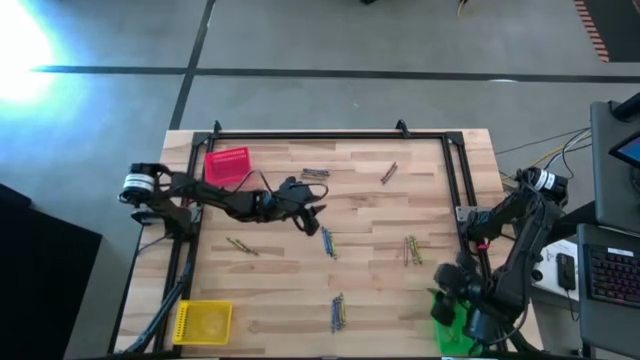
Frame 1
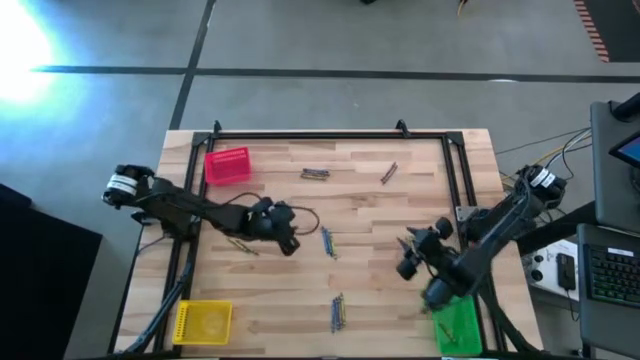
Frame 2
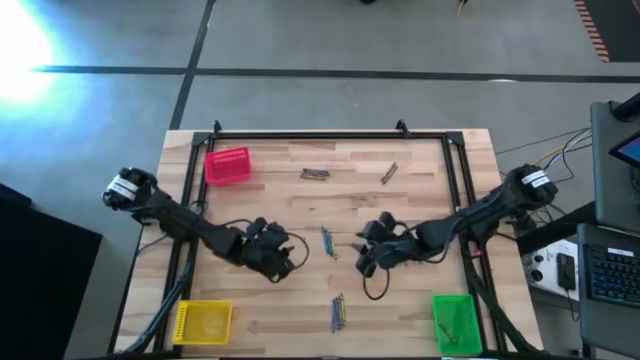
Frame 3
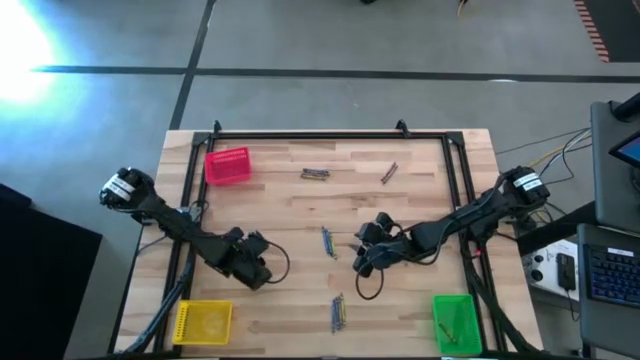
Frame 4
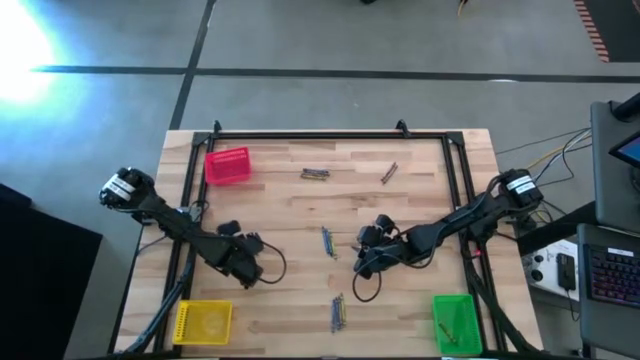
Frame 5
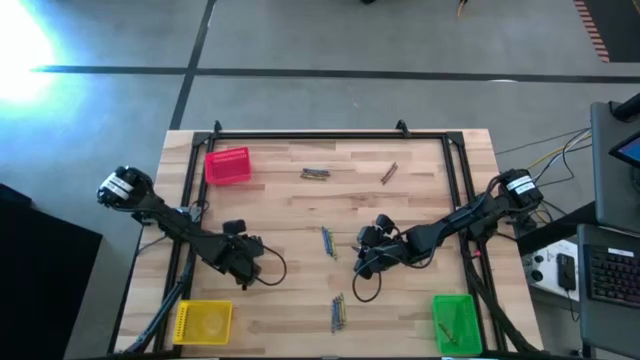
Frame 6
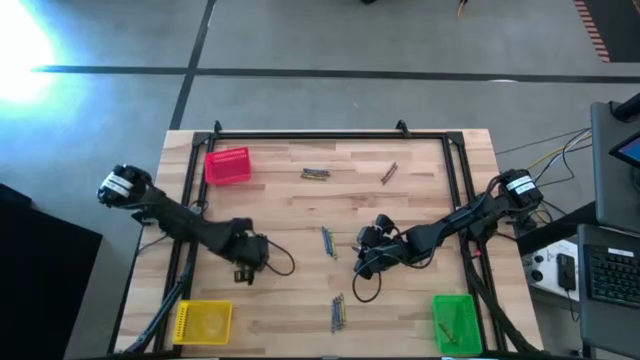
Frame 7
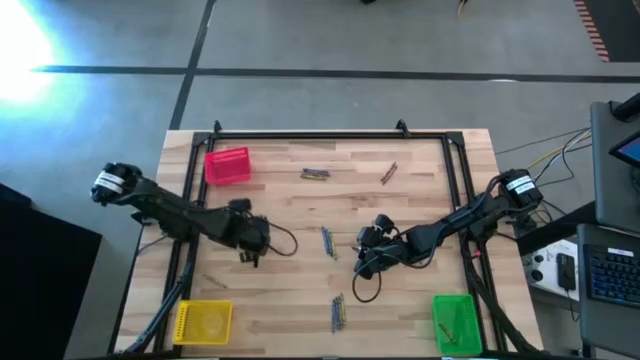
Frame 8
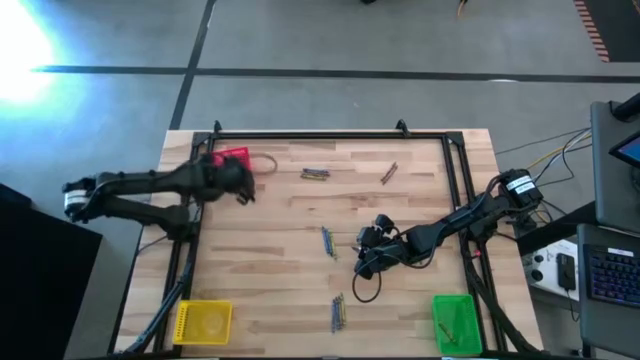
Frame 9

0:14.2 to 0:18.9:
Task: Sort crayons
Put the brown crayon into the red bin

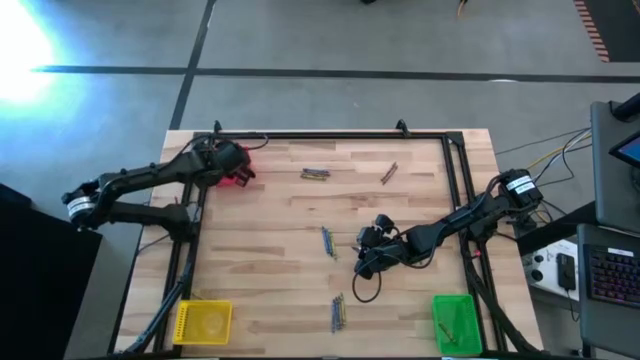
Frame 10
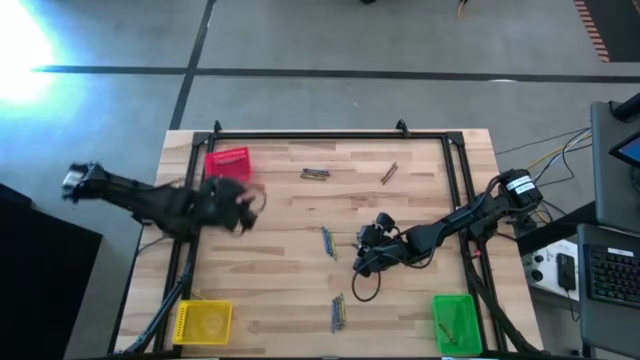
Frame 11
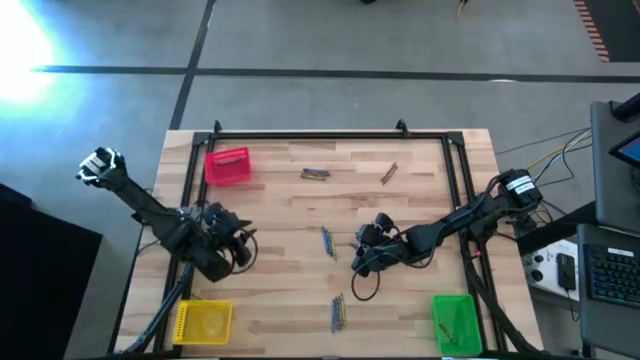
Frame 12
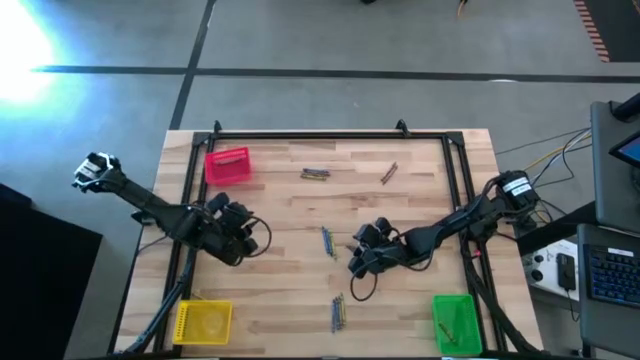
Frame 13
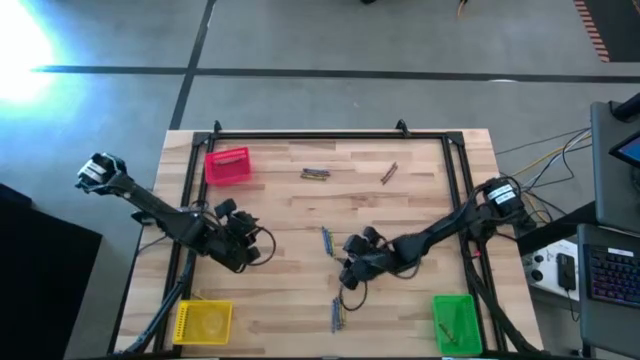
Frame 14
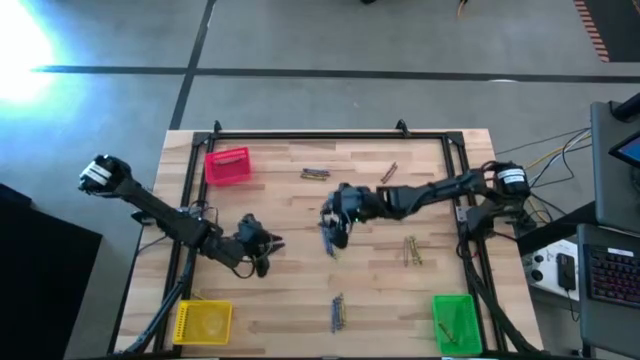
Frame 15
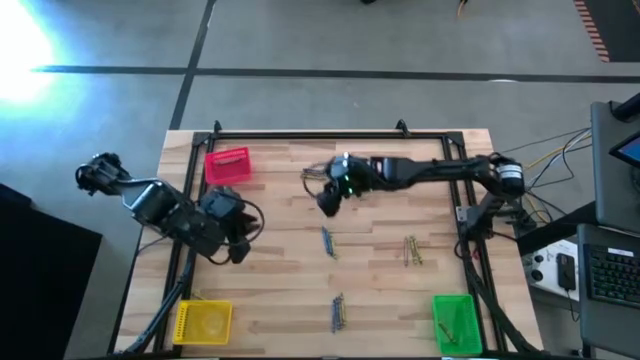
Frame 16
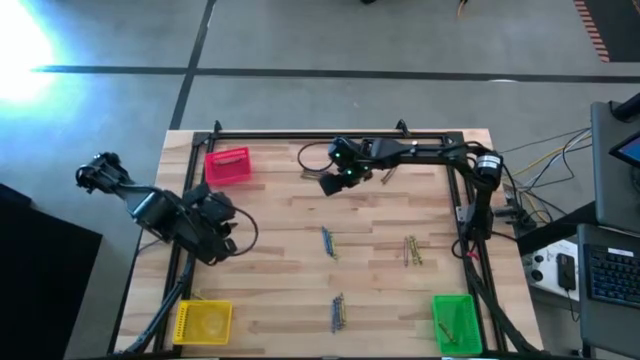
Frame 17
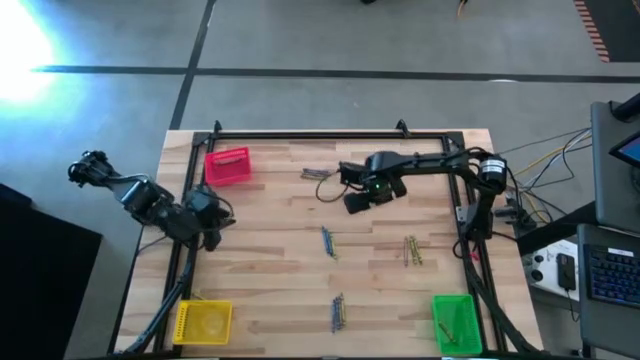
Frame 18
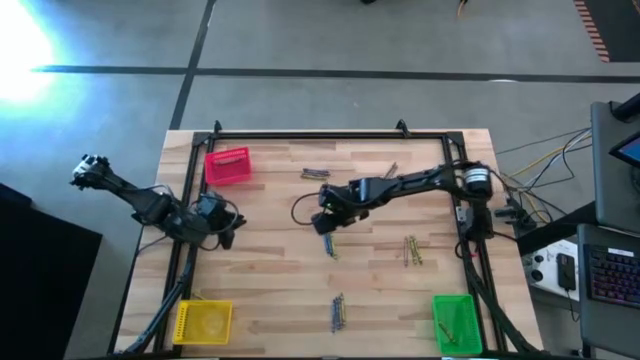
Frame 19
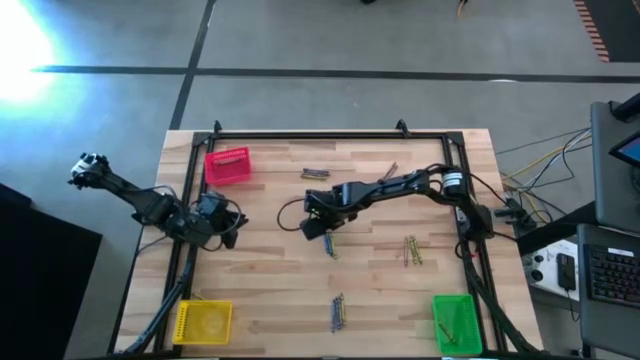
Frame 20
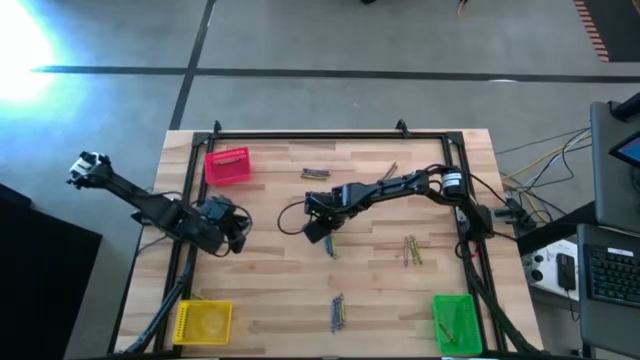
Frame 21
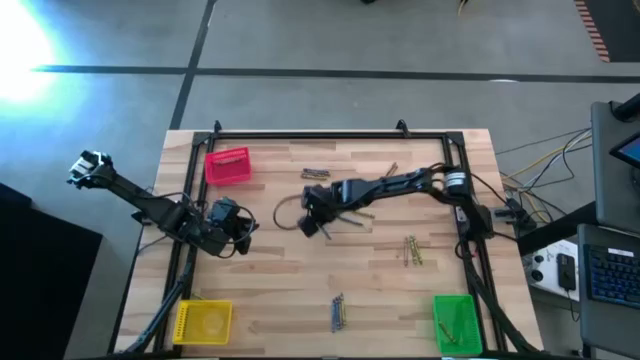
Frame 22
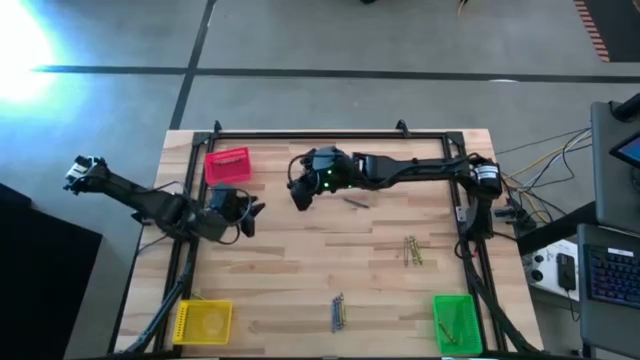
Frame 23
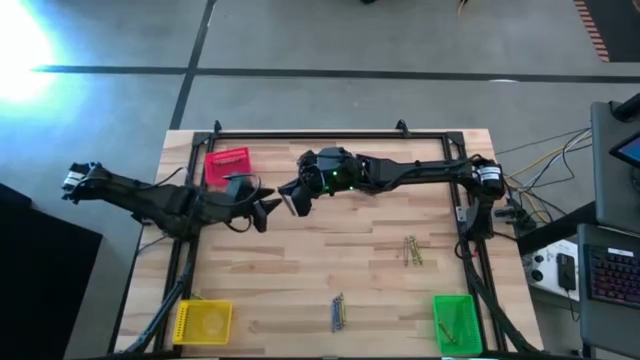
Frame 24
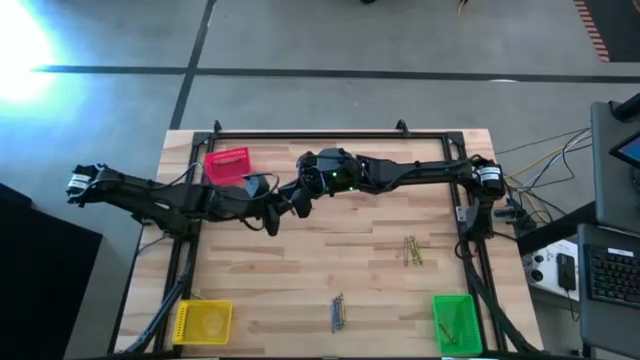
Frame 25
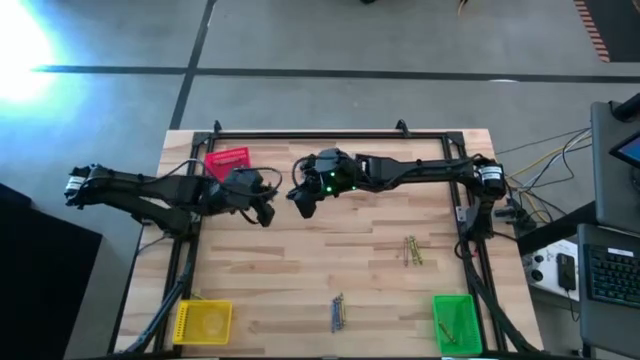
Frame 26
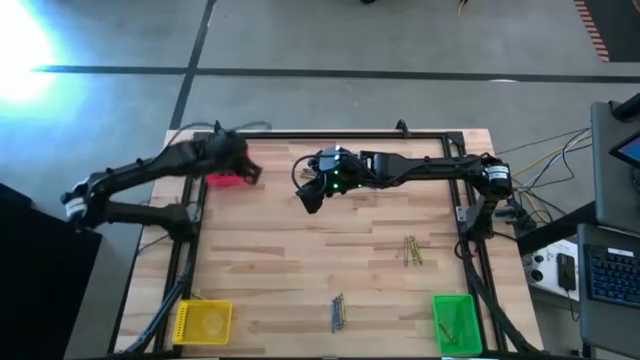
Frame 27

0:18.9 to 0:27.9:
Put the blue crayon into the red bin

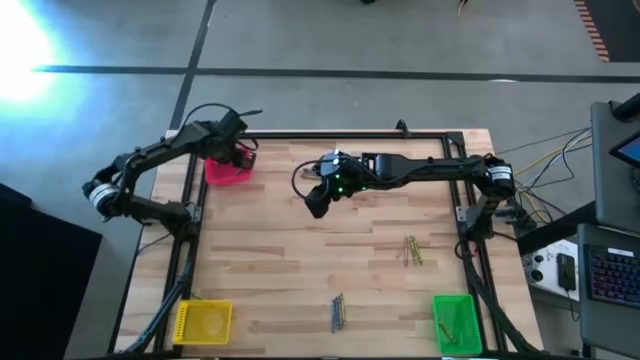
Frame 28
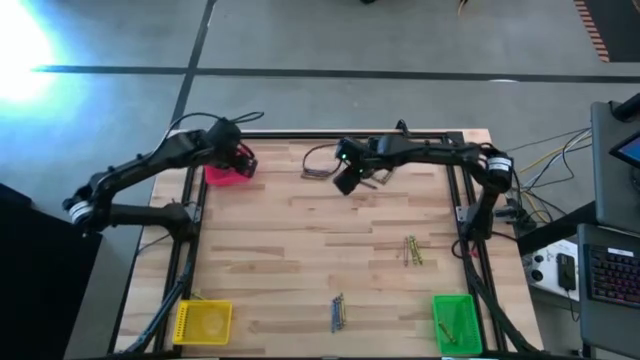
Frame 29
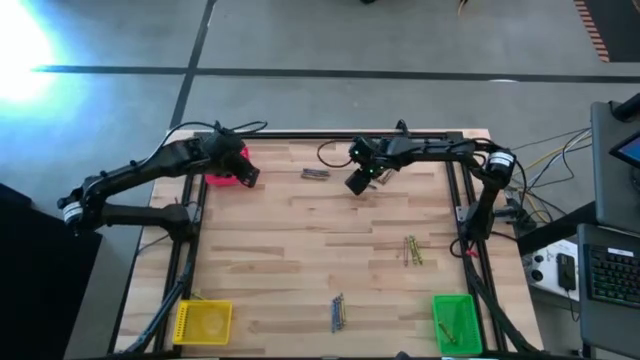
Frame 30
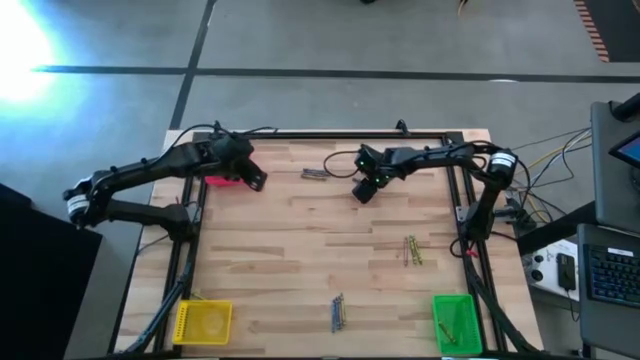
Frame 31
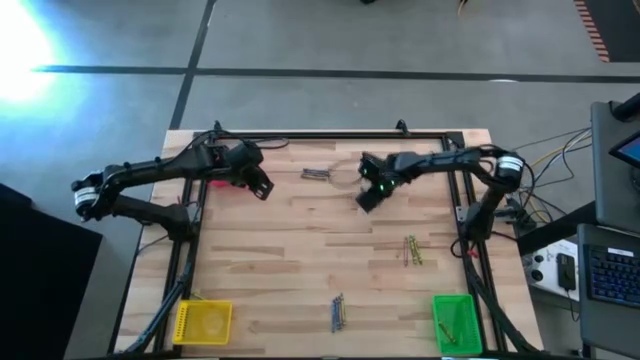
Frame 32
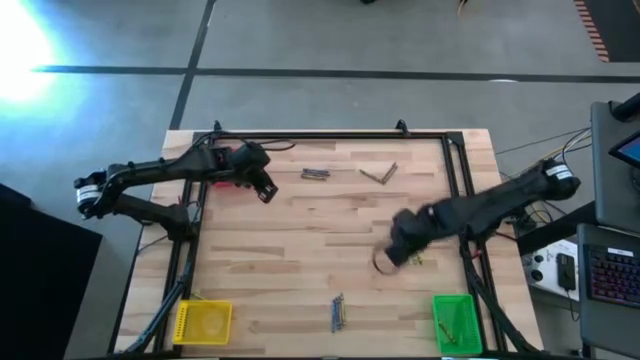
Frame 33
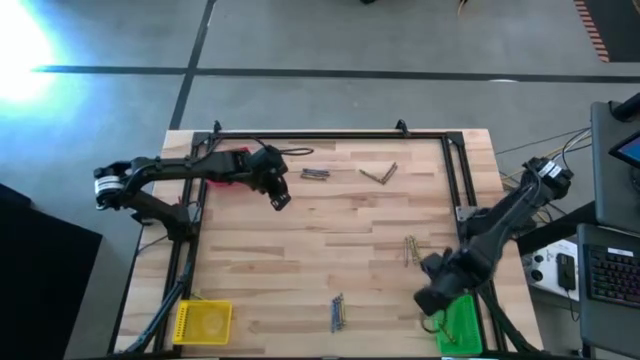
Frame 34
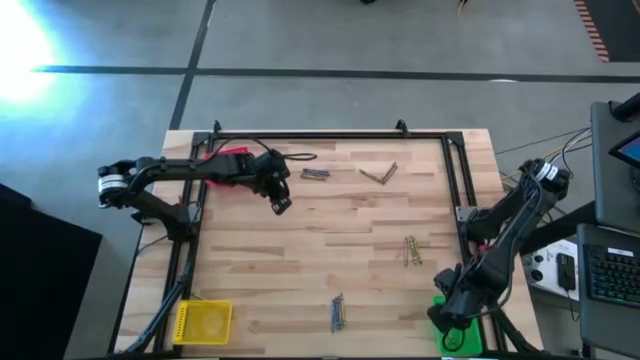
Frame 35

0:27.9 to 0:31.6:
Put the blue crayon into the green bin

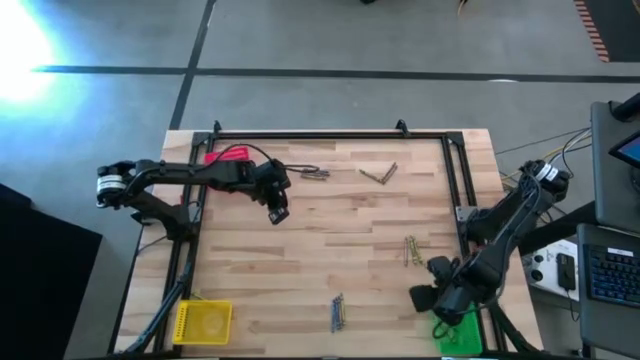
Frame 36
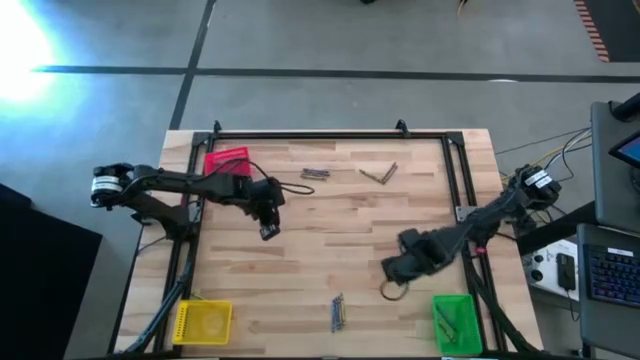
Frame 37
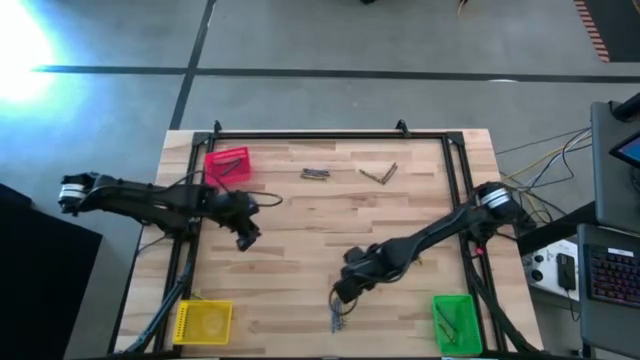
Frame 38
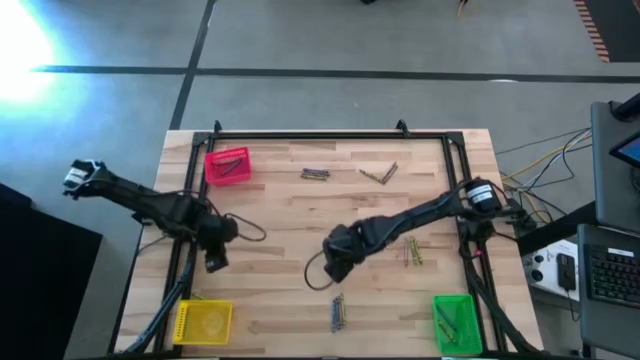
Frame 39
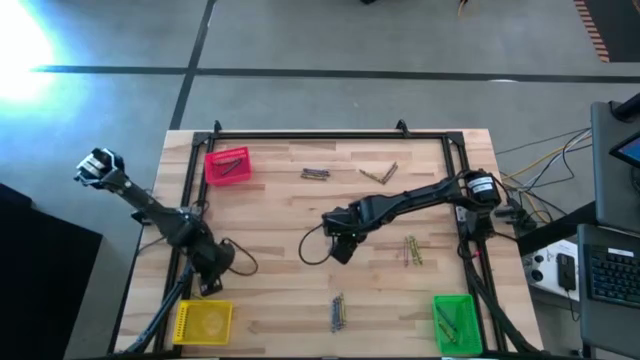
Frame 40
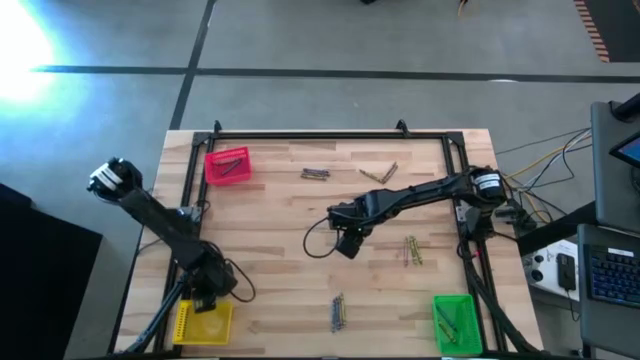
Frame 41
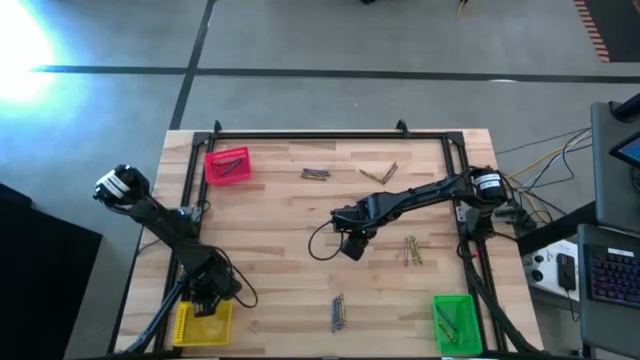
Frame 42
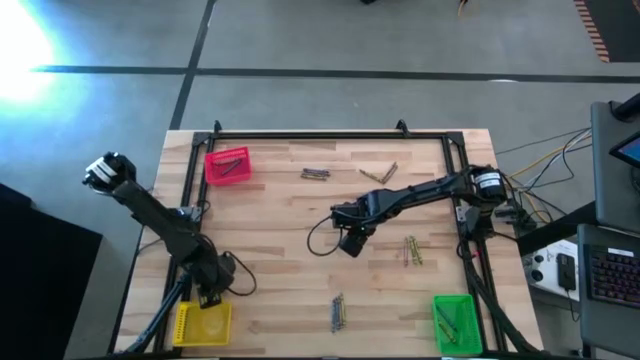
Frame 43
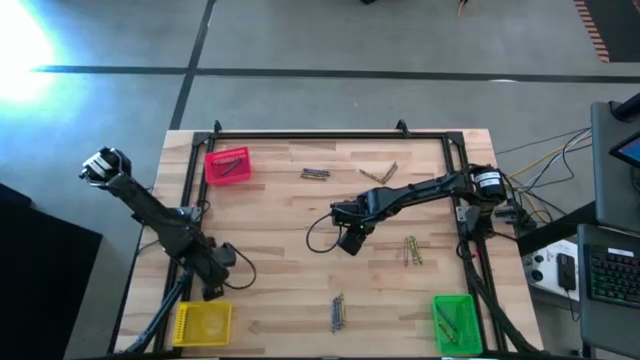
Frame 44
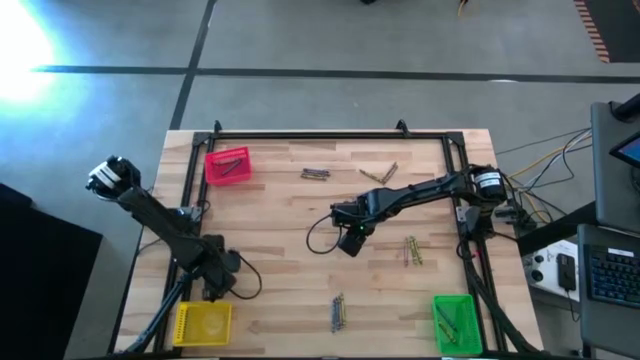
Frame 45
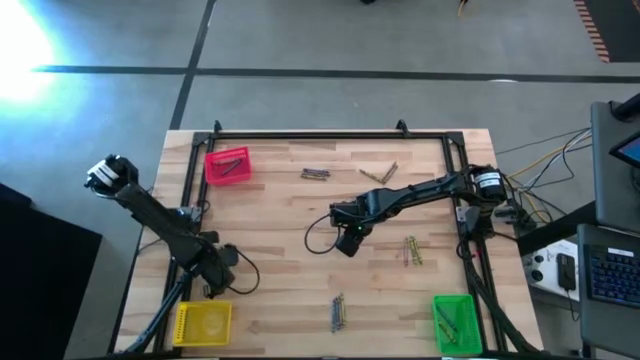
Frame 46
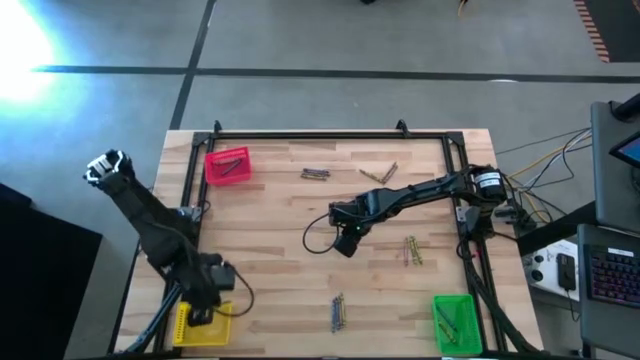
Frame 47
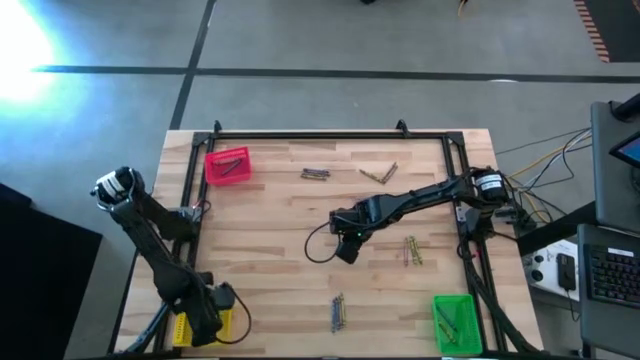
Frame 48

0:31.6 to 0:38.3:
Put the green crayon into the yellow bin
